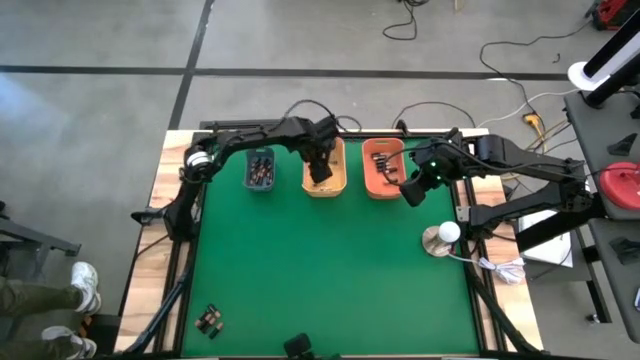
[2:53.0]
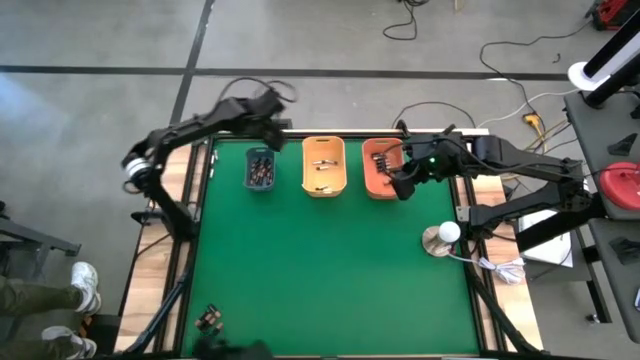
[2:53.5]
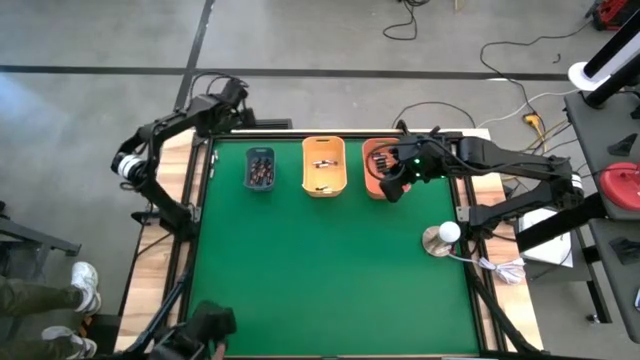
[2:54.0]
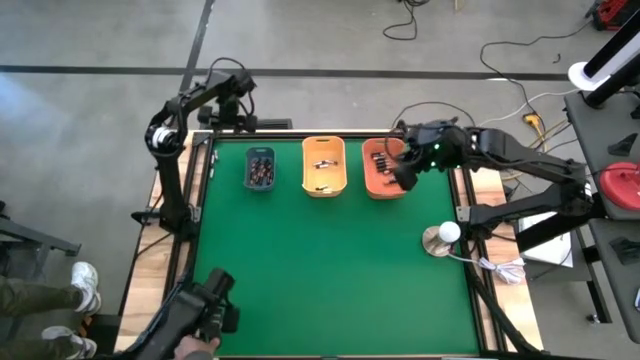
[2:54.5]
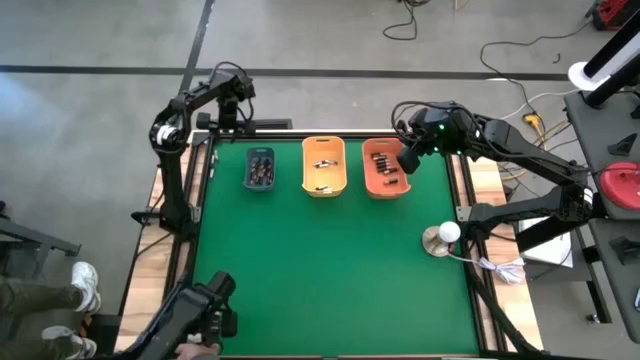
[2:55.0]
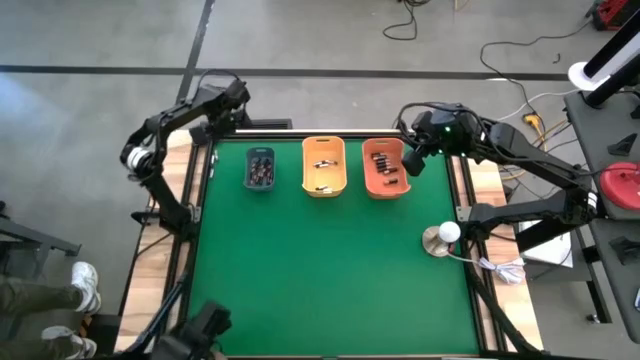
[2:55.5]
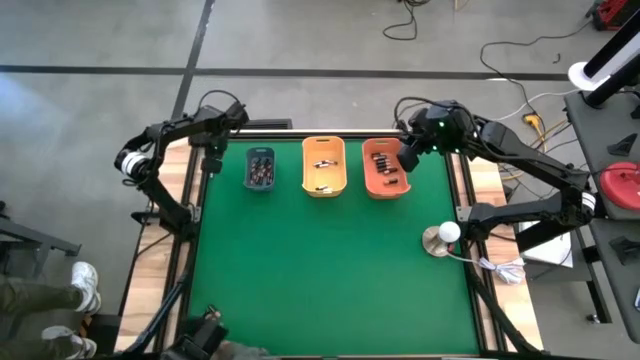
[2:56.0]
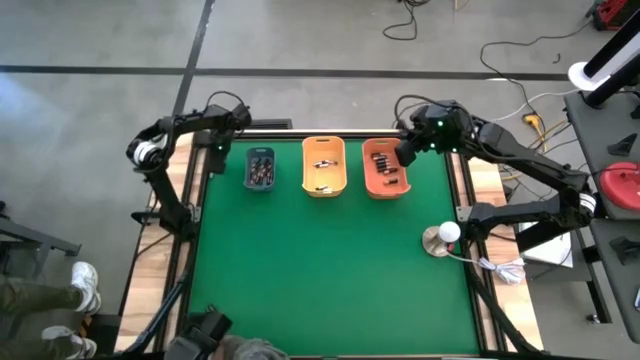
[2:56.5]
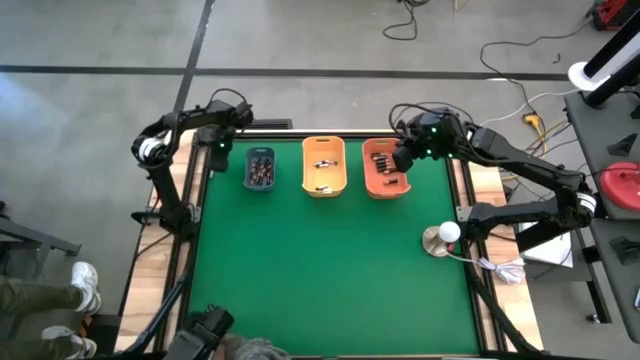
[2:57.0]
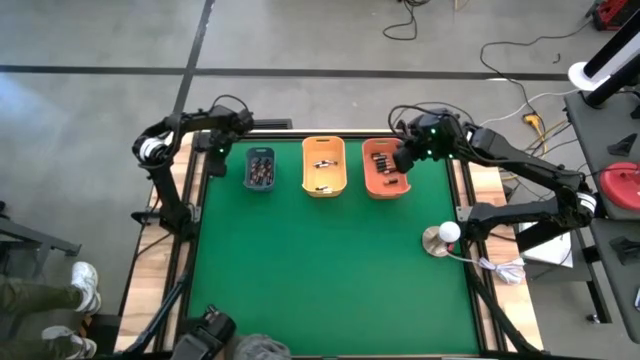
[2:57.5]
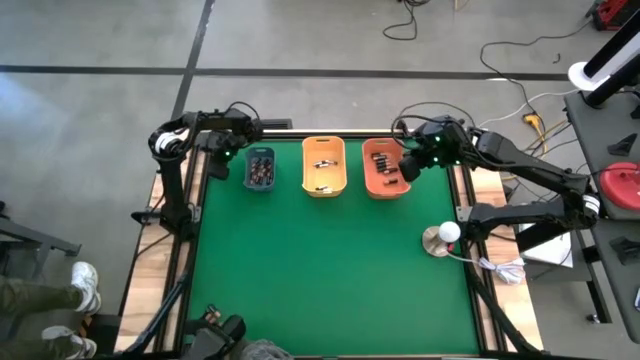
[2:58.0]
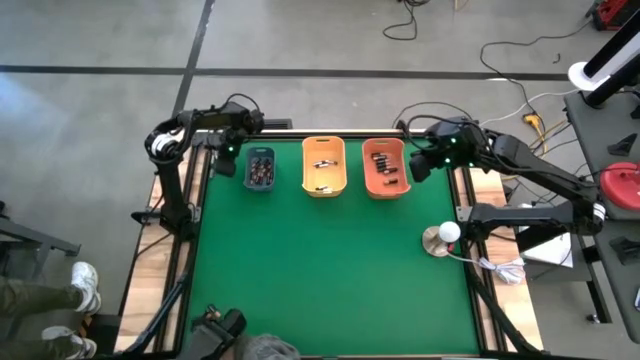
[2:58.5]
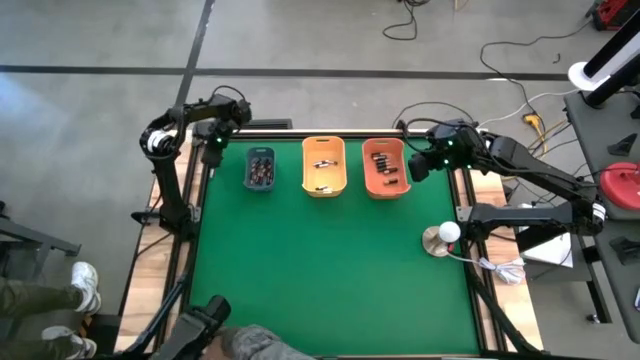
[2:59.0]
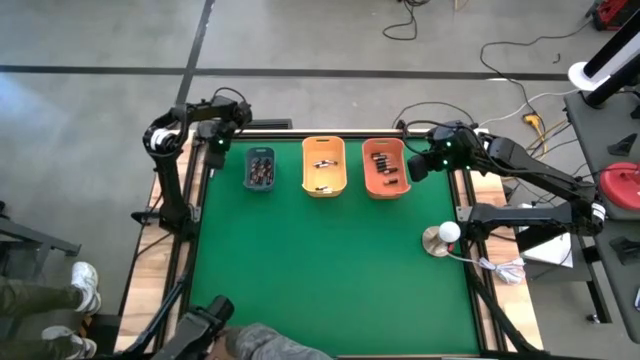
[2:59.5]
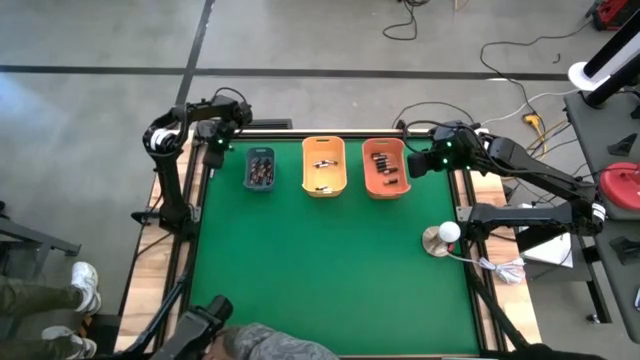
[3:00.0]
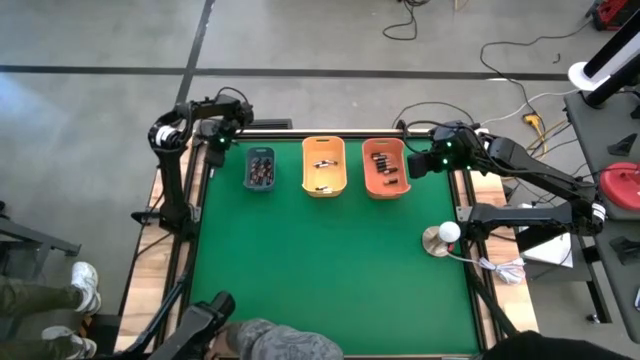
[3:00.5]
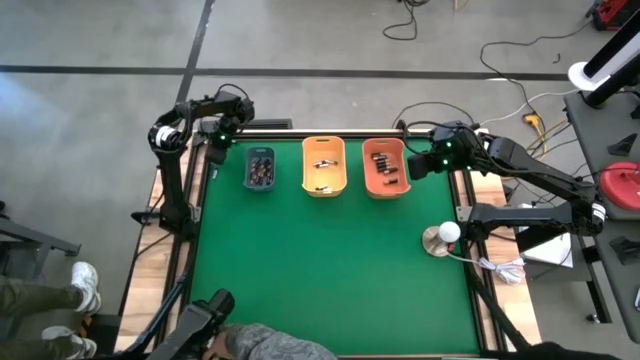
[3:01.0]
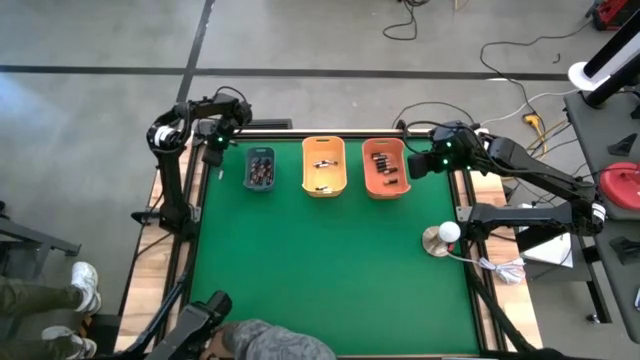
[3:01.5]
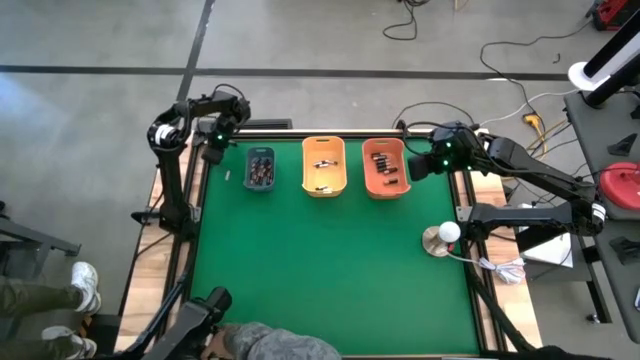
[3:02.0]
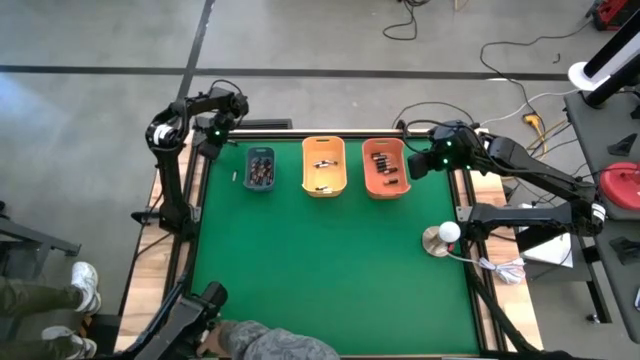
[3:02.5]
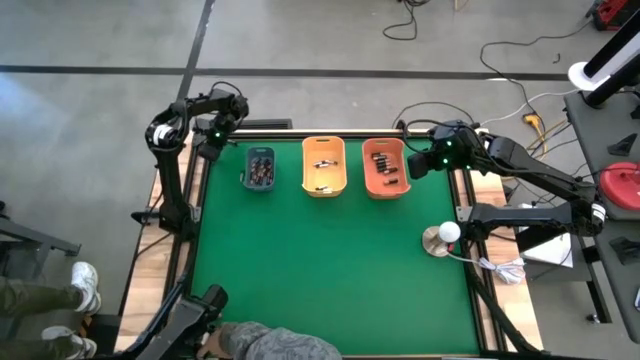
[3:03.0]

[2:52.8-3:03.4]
Task: Sort batteries
Adjust the silver batteries

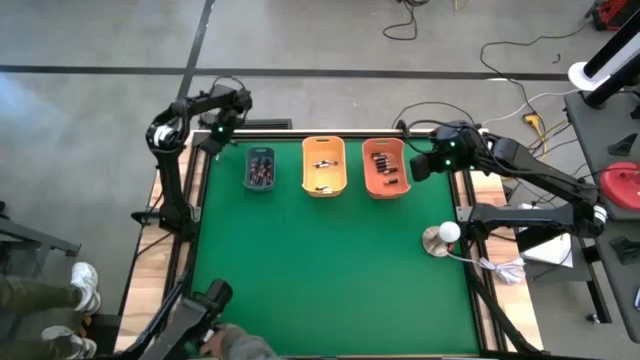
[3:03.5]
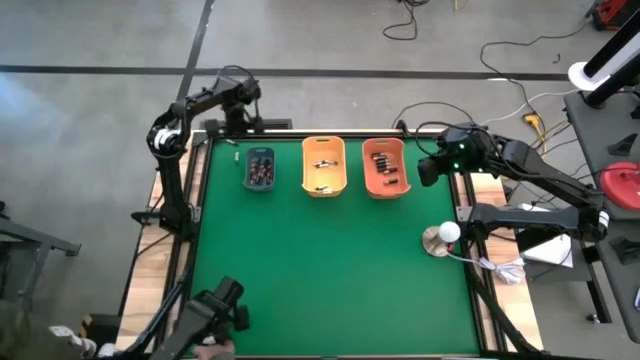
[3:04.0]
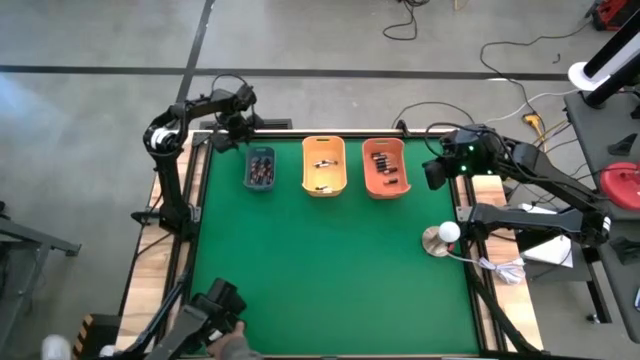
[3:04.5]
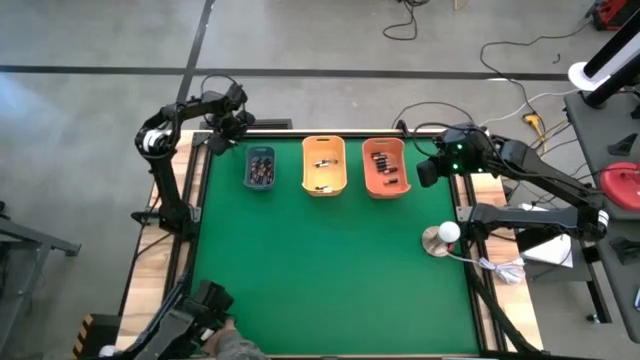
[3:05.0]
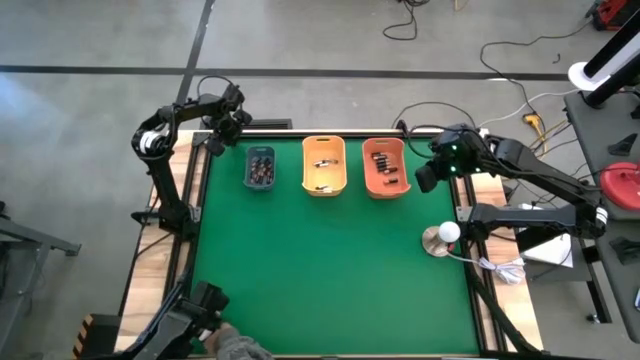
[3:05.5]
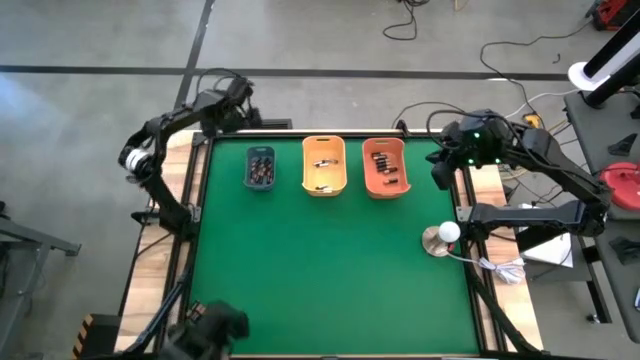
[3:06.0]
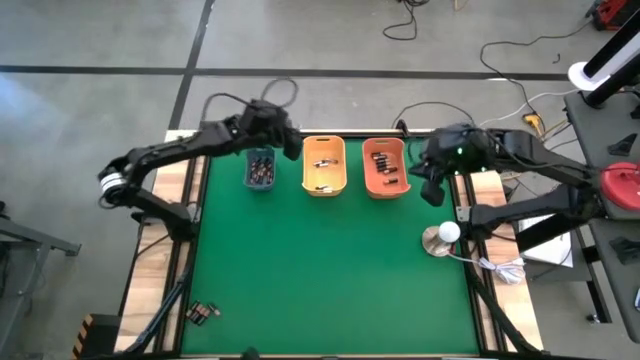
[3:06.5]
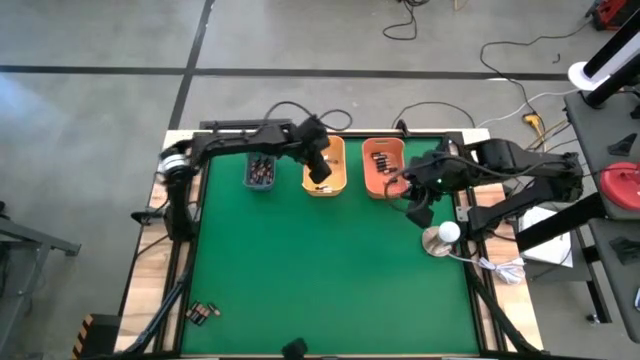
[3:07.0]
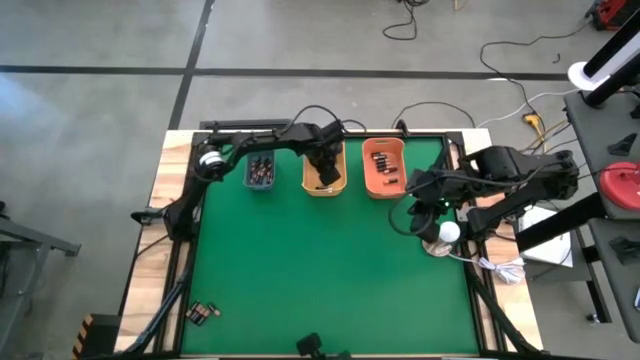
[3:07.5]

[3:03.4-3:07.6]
Put the silver battery into the yellow bin

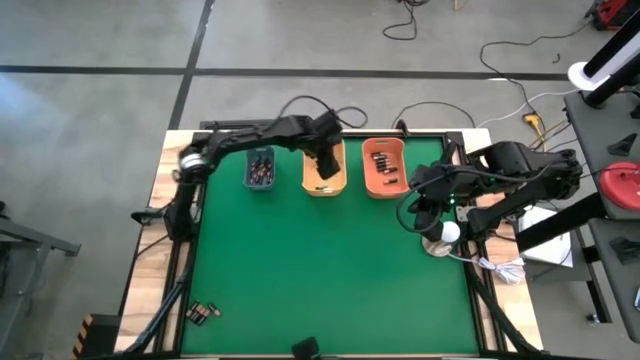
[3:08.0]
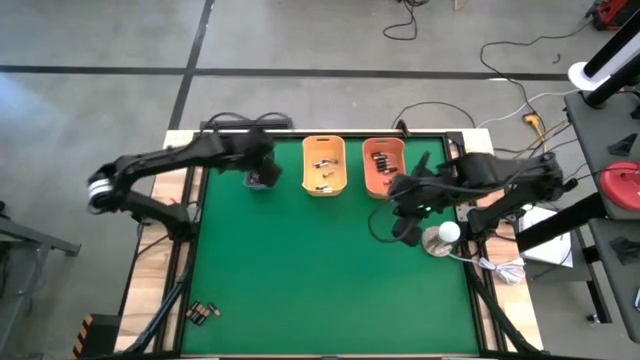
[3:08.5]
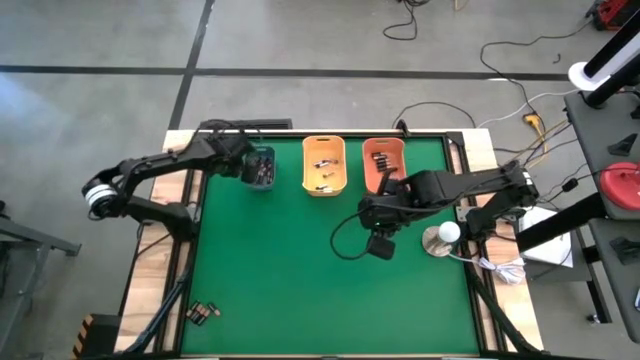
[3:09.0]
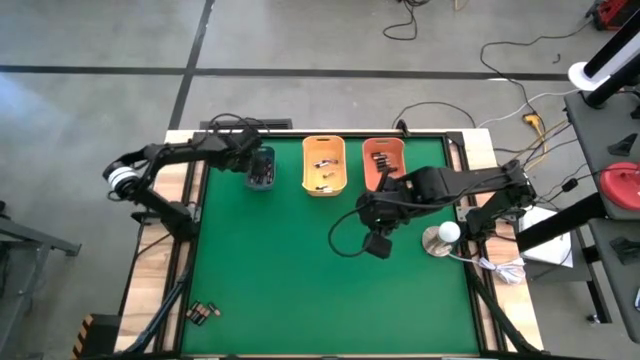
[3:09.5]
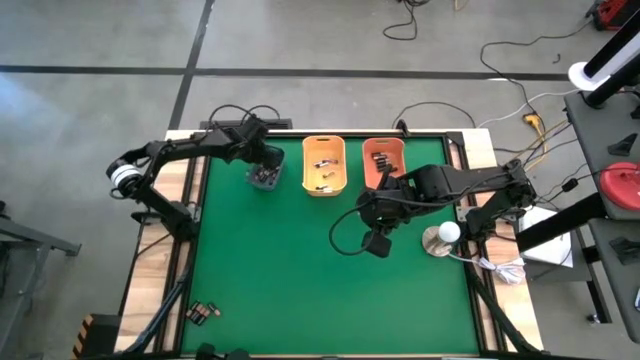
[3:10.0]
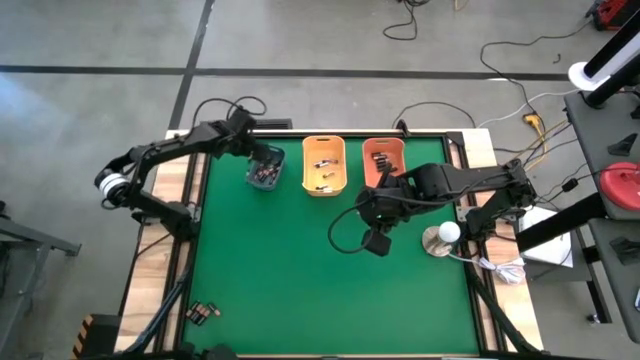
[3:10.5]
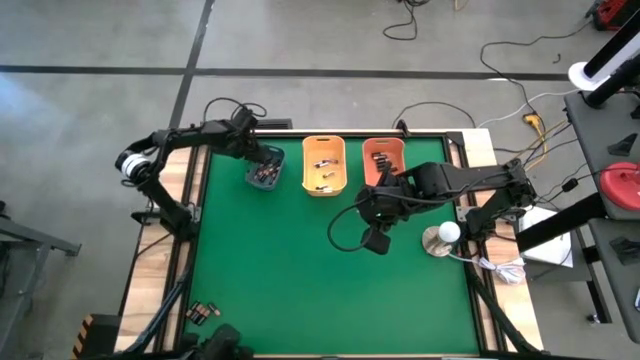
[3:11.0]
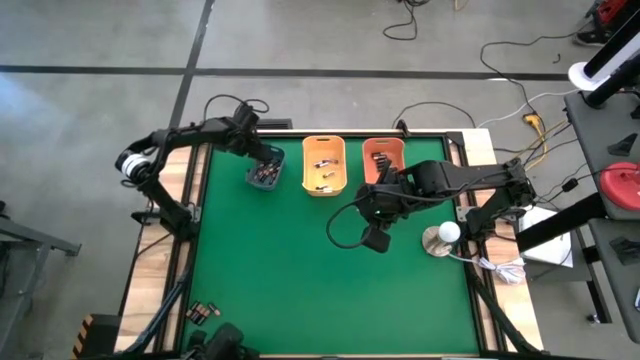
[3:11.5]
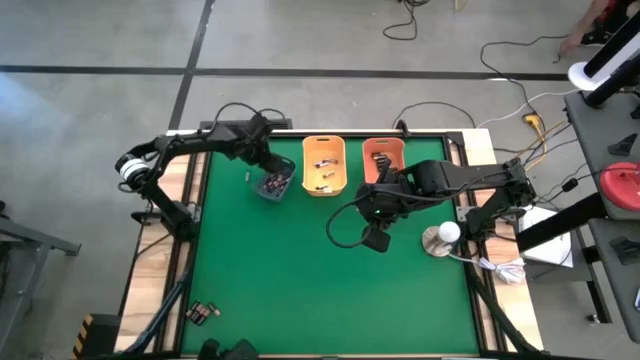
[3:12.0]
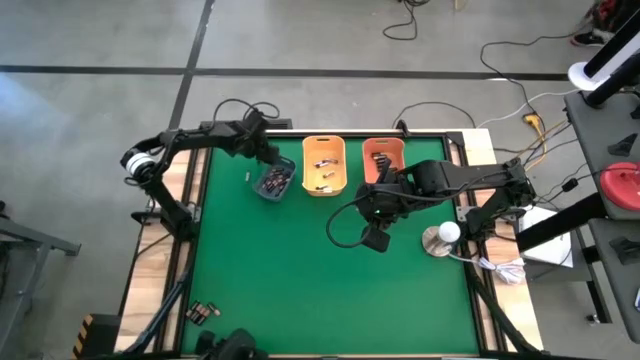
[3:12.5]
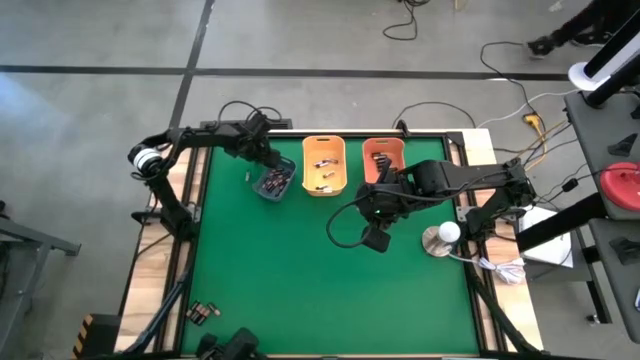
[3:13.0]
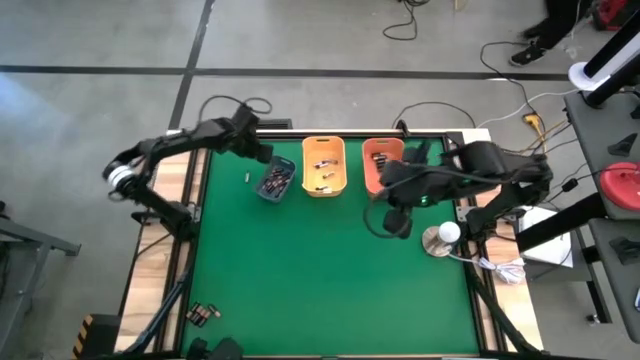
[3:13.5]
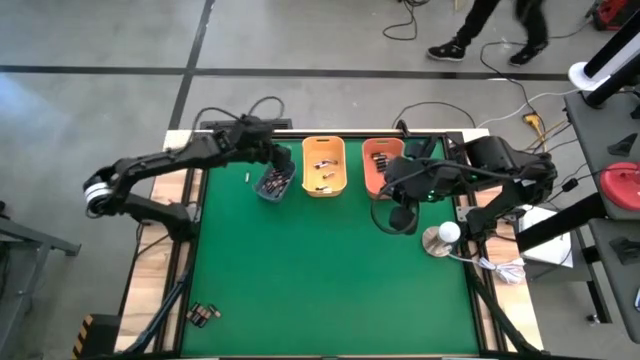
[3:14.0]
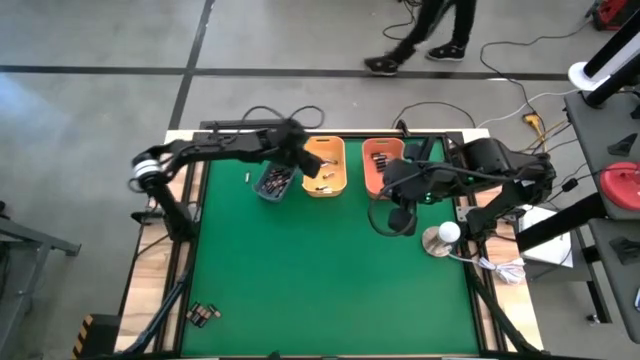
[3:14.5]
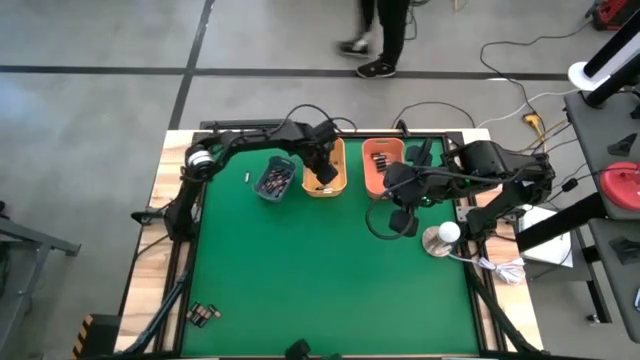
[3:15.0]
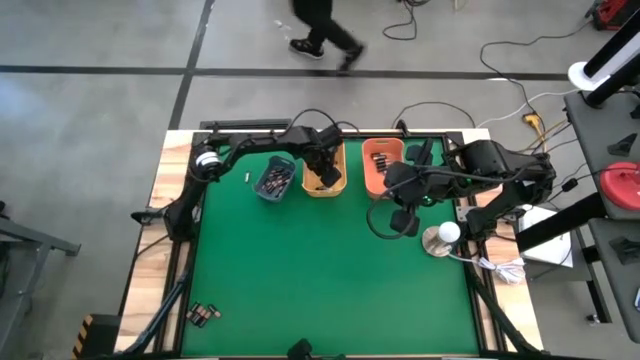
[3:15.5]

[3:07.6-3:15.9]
Put the silver battery into the yellow bin
